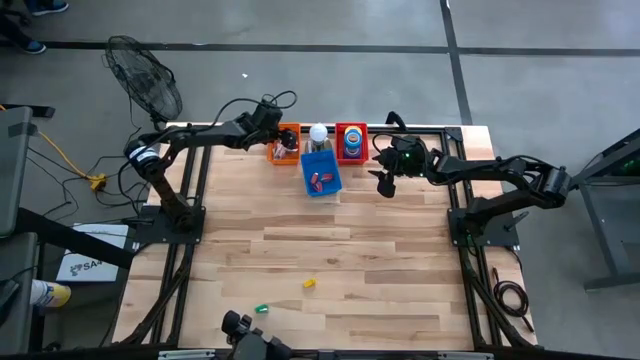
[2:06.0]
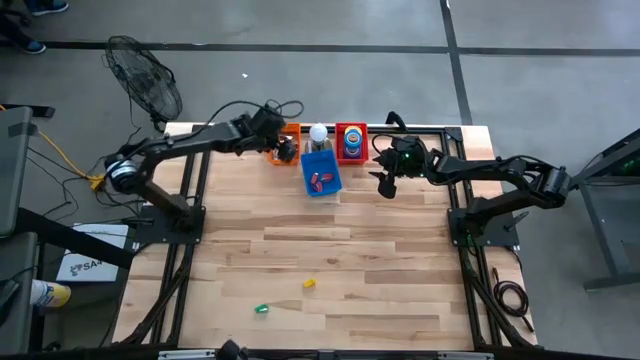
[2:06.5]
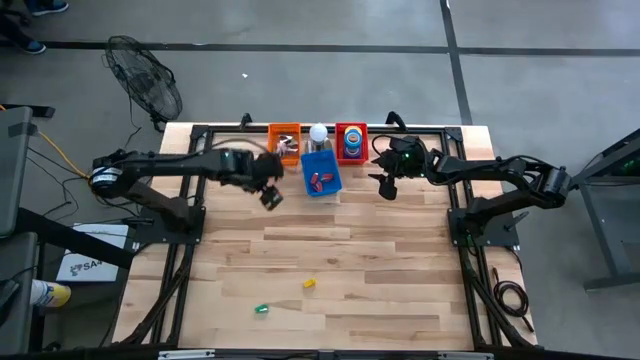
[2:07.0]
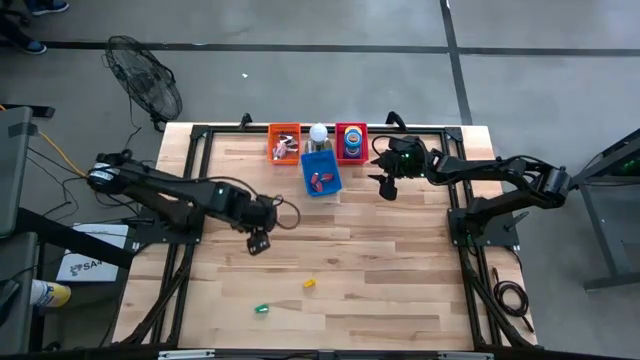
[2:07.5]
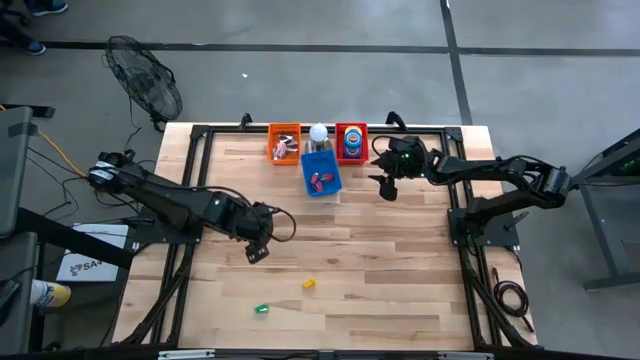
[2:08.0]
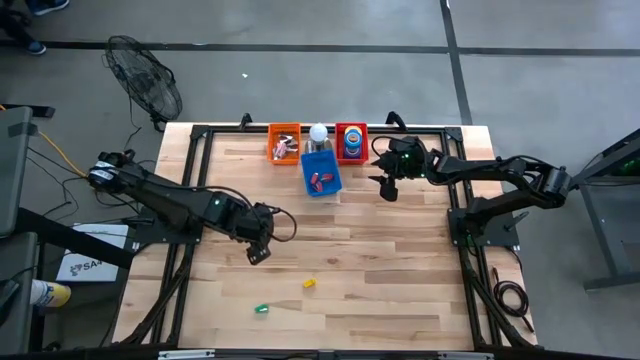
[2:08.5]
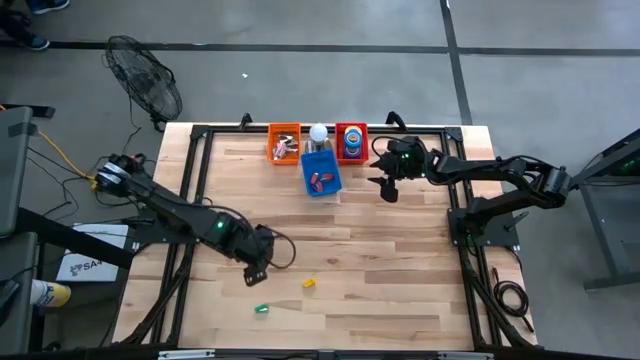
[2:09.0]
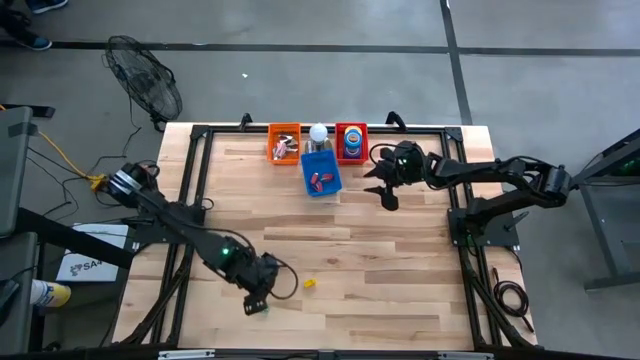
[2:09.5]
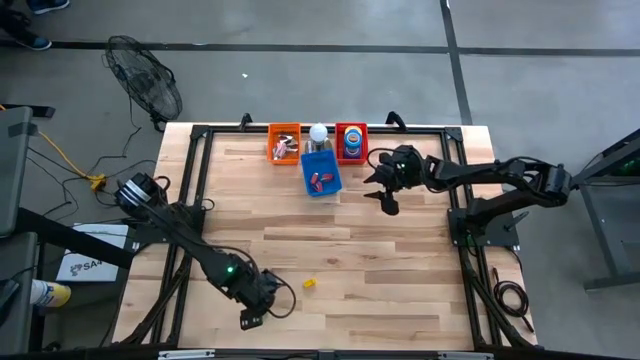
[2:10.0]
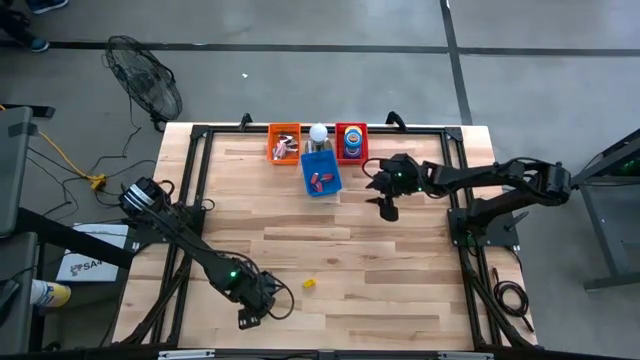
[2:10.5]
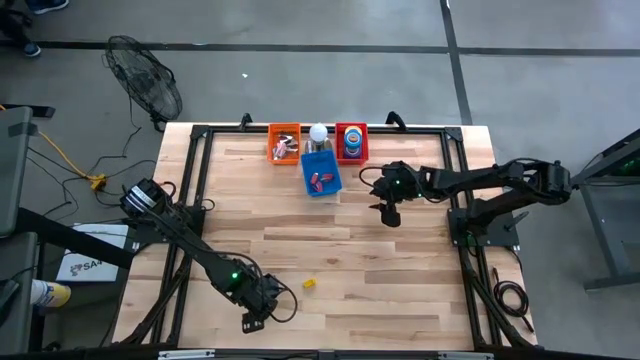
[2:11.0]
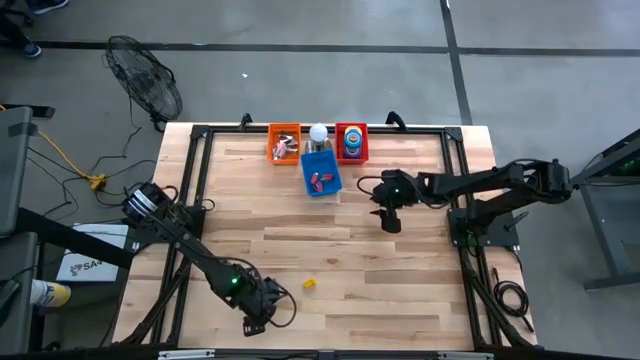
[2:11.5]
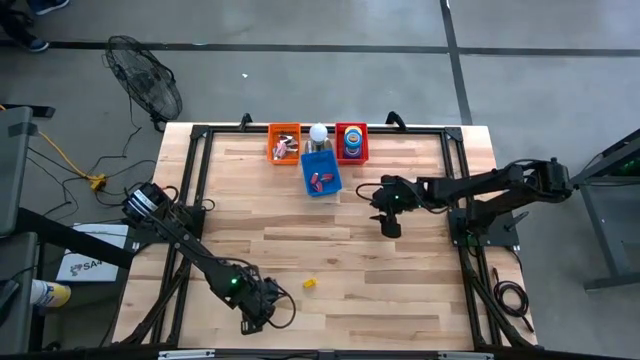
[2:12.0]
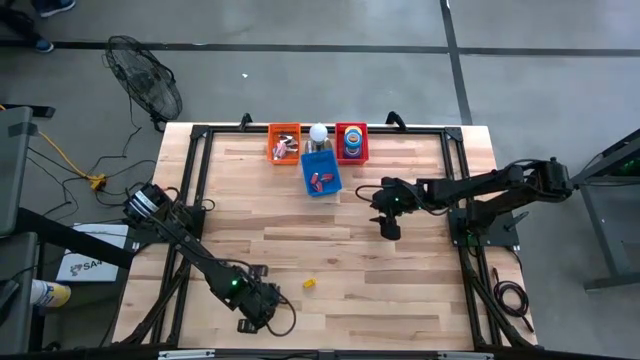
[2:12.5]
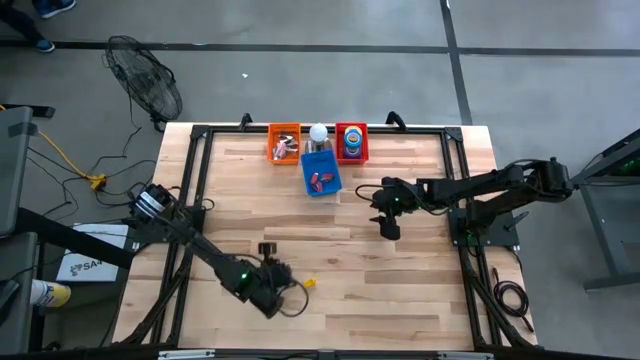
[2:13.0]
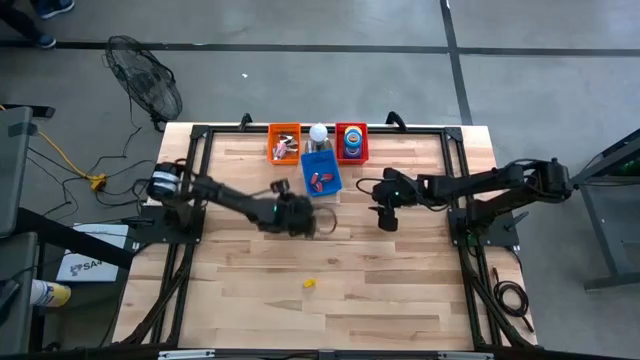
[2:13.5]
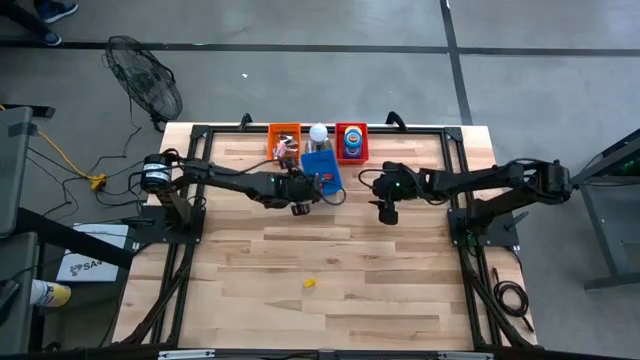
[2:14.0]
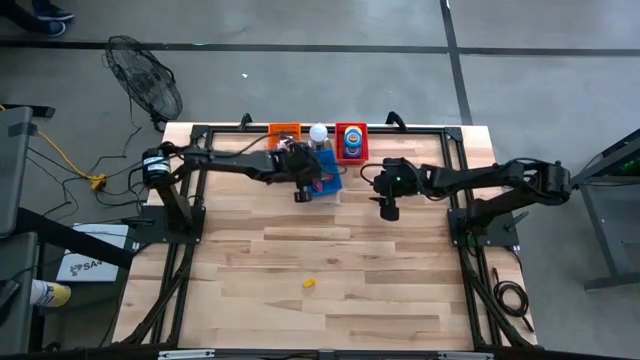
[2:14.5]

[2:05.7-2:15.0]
Task: Pick and place Stapler, Stapler remover, tape
Put the green stapler into the blue basket

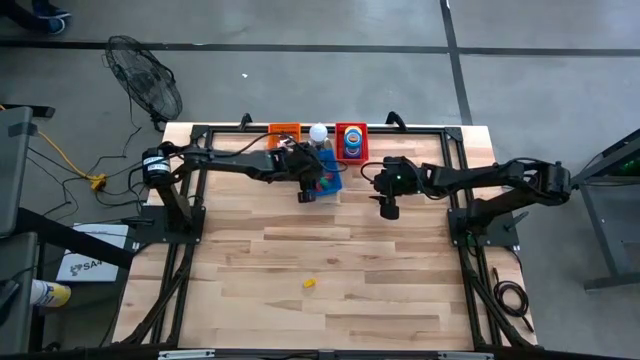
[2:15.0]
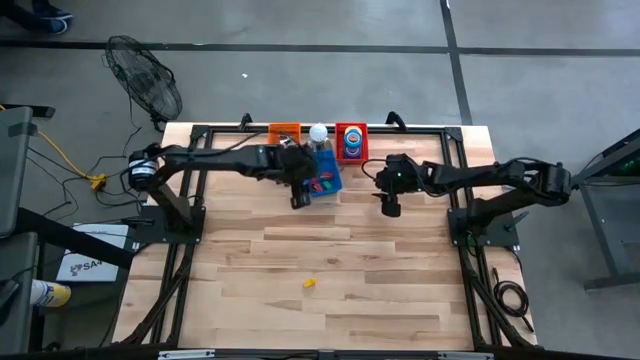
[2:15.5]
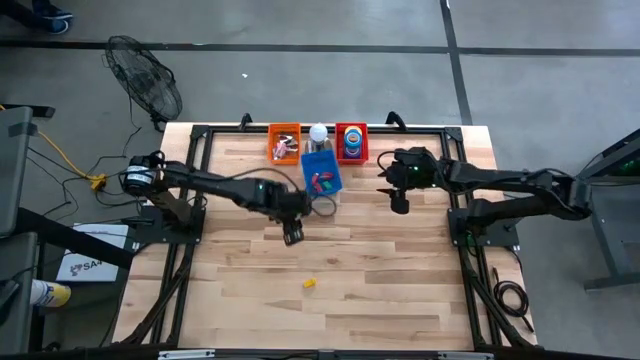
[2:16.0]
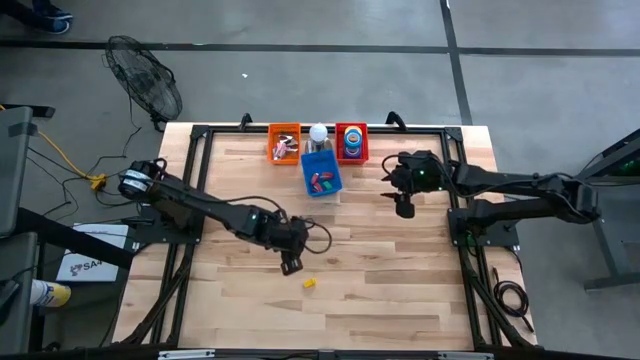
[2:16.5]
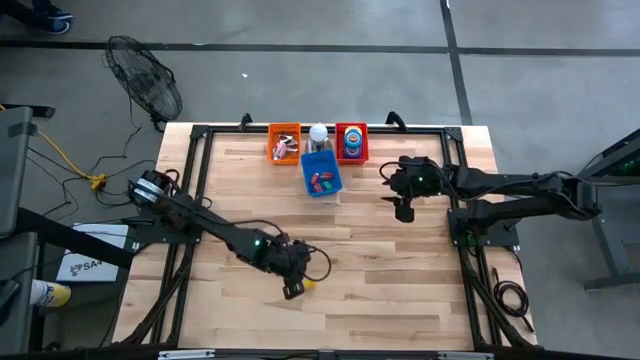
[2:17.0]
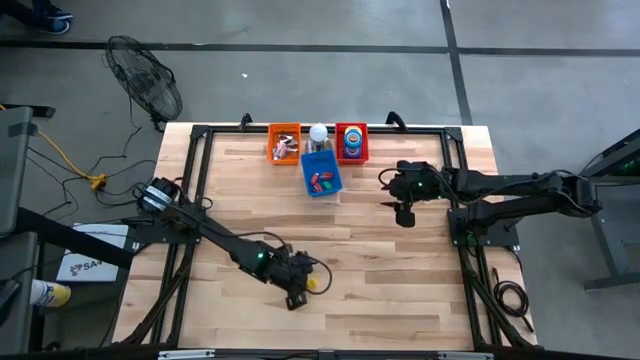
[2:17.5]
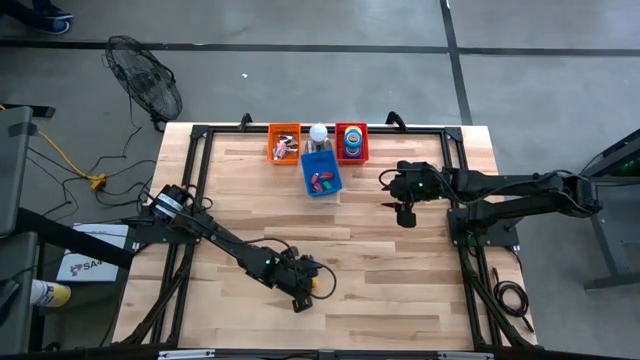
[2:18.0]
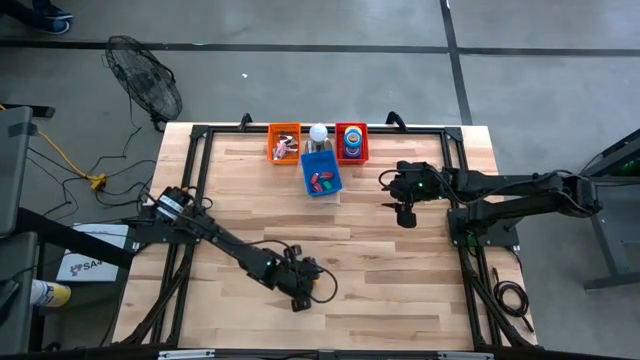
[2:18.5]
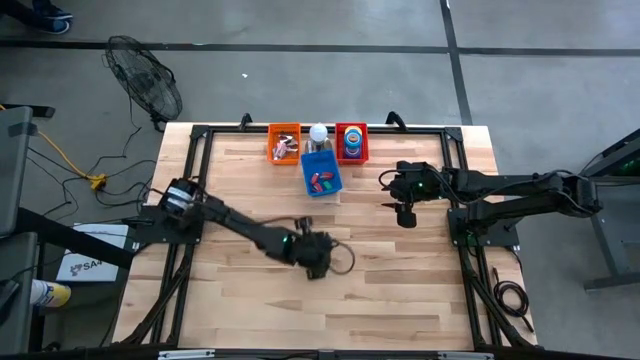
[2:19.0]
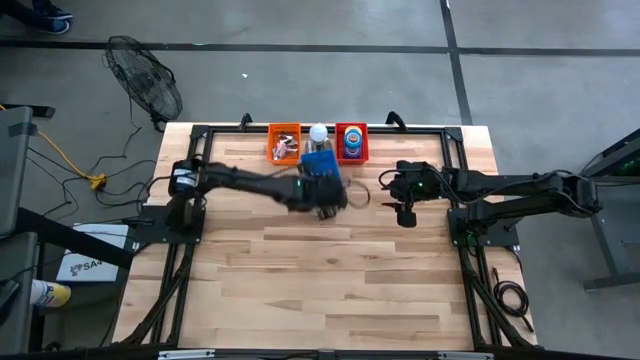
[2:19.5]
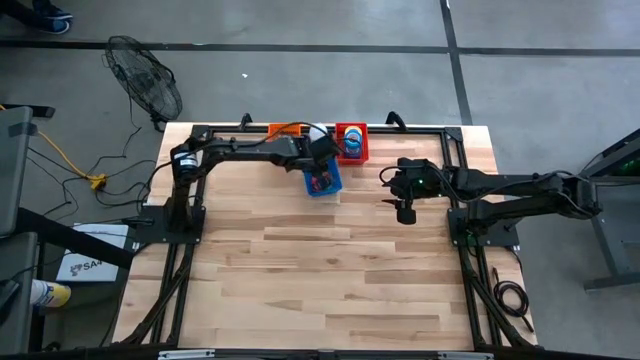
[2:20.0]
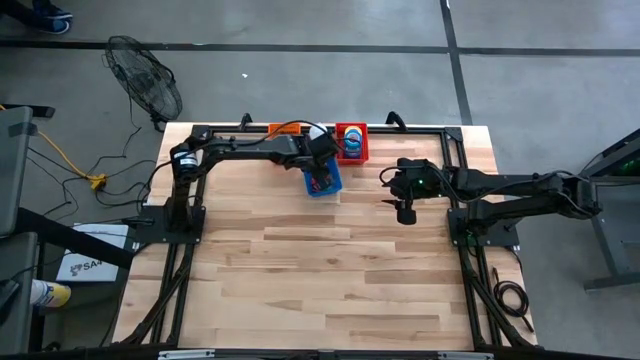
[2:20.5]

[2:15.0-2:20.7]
Put the yellow stapler into the blue basket

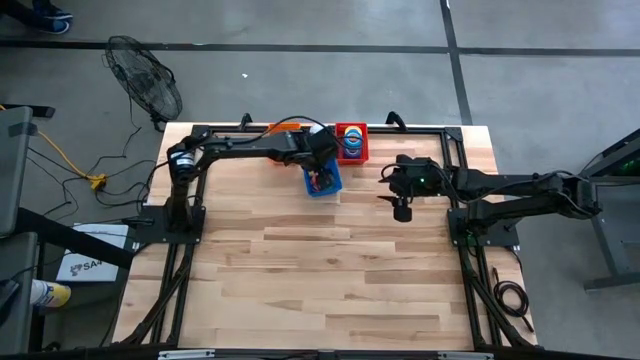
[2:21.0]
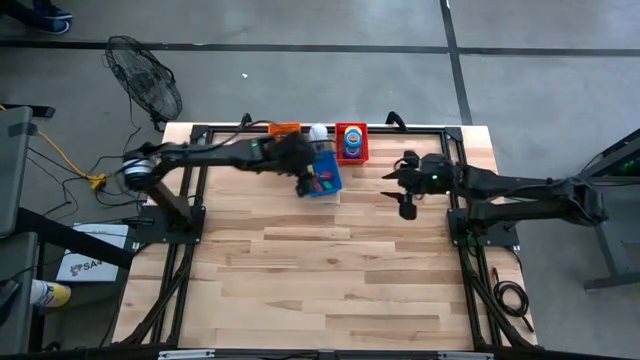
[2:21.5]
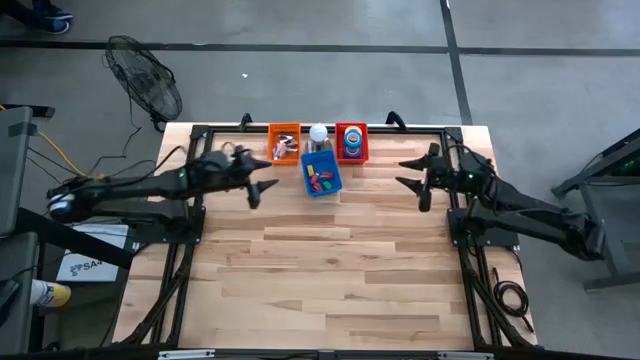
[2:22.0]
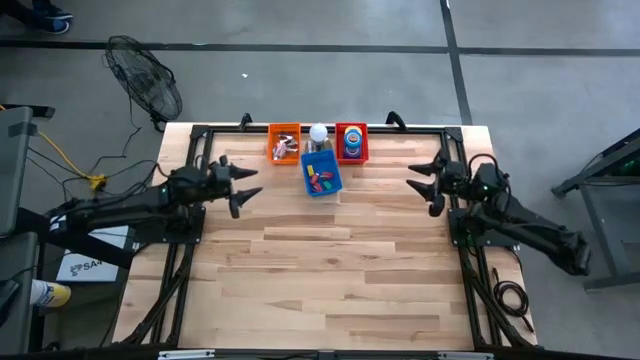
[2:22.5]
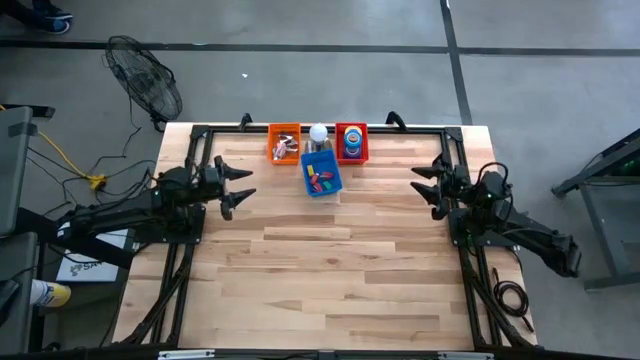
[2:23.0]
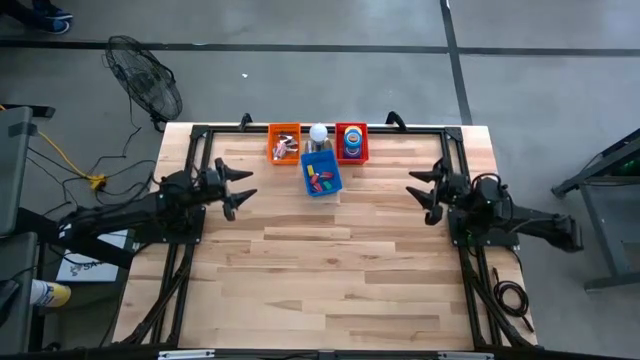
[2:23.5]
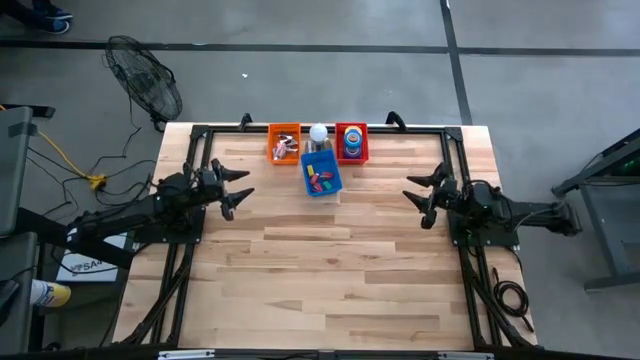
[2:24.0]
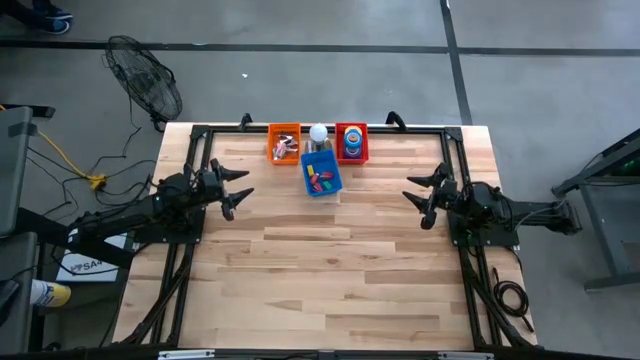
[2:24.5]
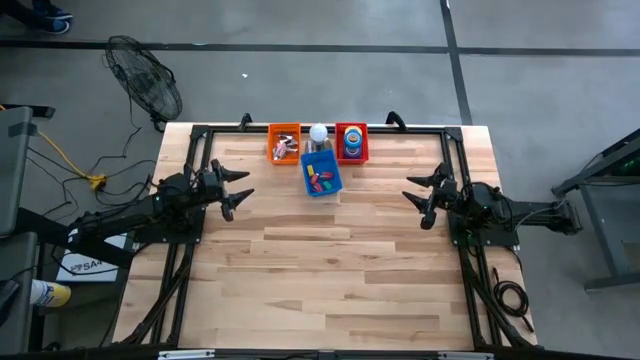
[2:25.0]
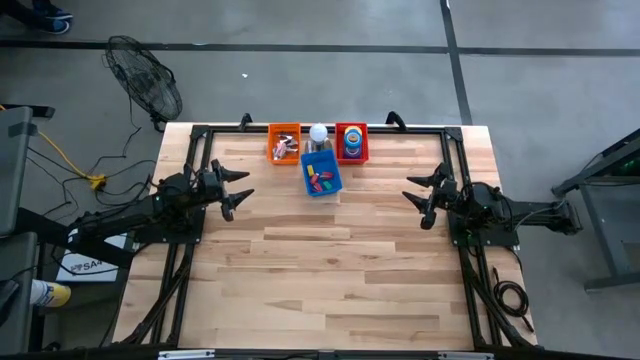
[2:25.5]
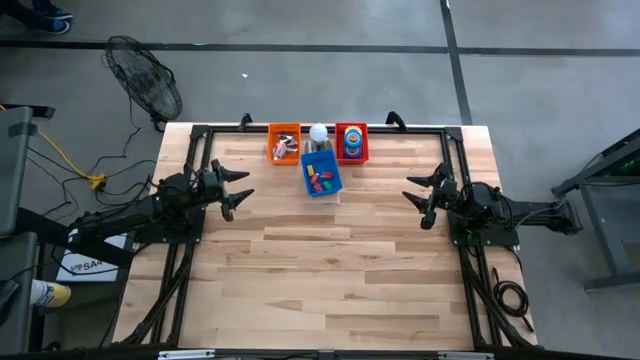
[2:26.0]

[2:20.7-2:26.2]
Return to Home Position
